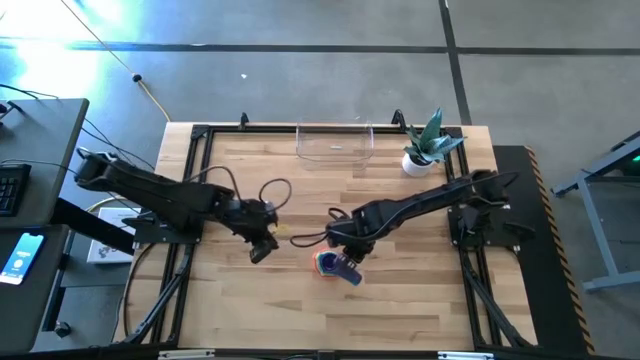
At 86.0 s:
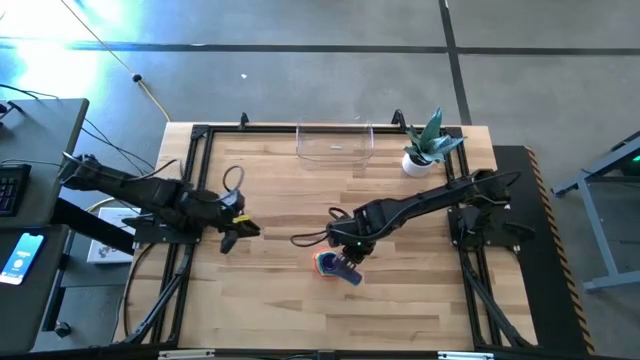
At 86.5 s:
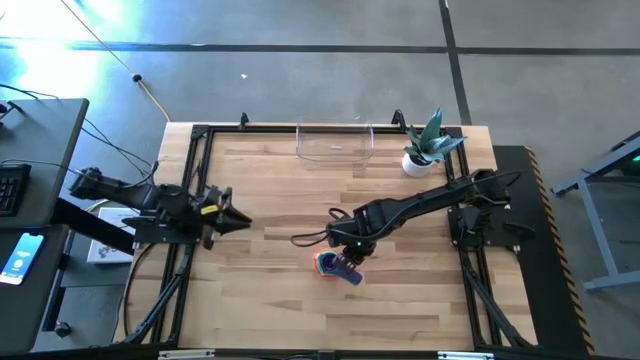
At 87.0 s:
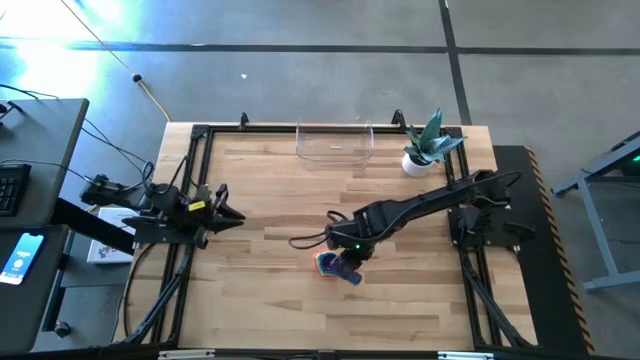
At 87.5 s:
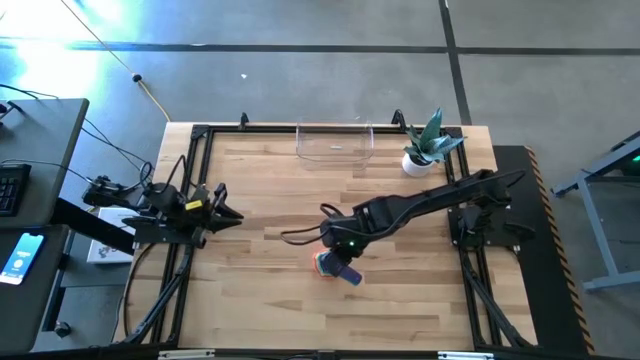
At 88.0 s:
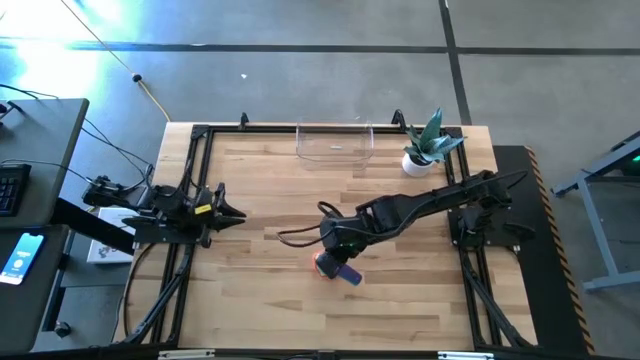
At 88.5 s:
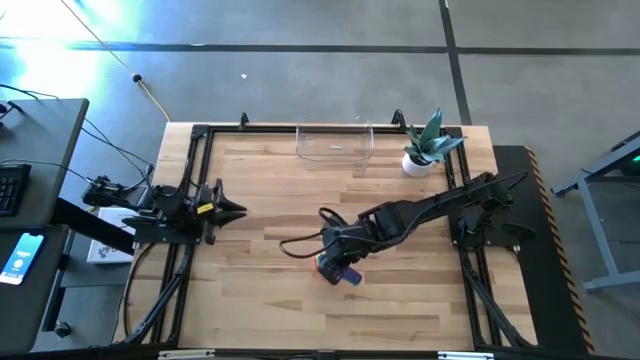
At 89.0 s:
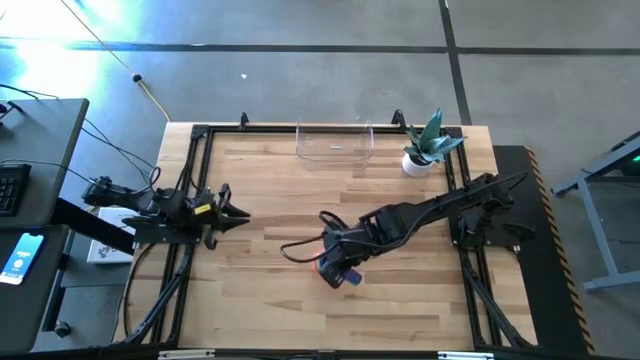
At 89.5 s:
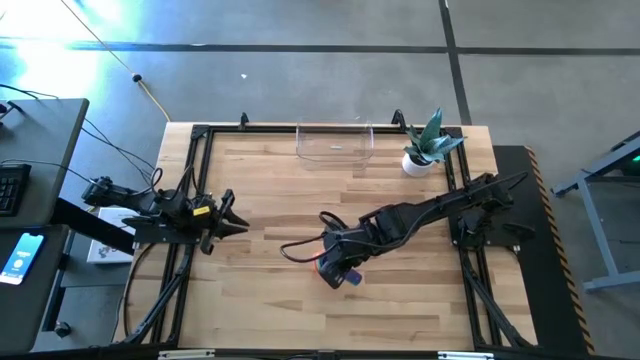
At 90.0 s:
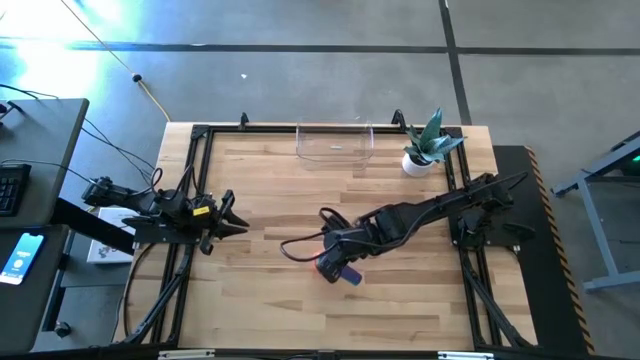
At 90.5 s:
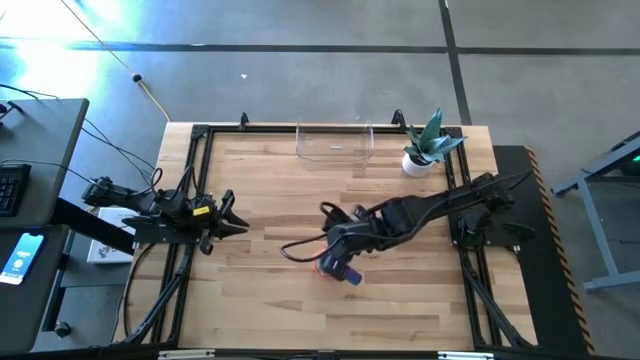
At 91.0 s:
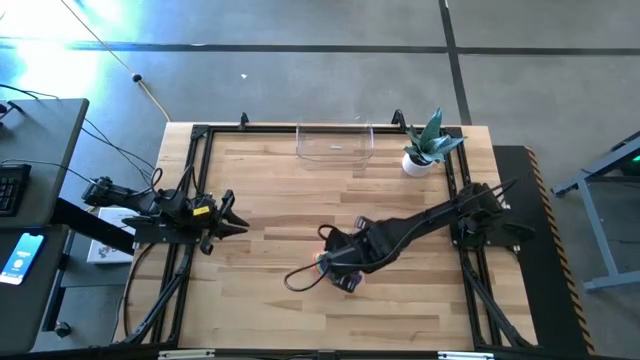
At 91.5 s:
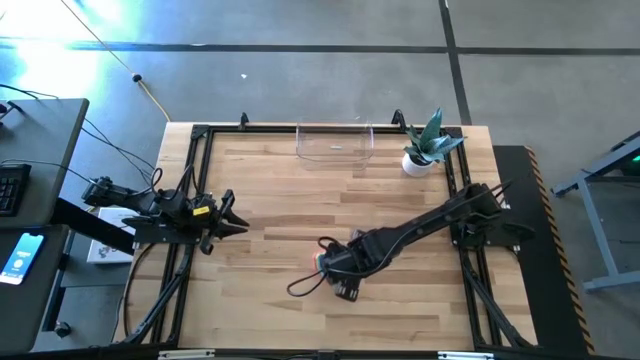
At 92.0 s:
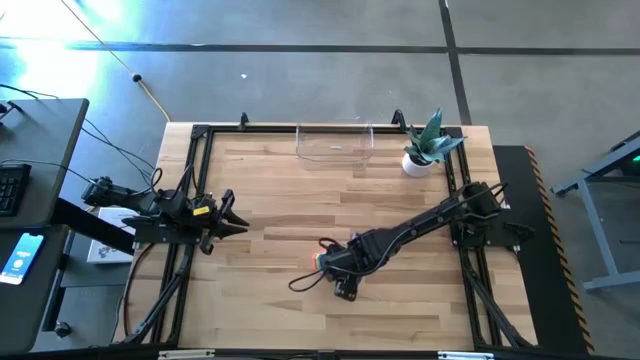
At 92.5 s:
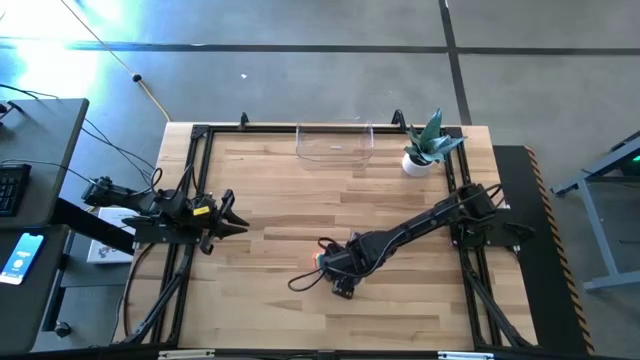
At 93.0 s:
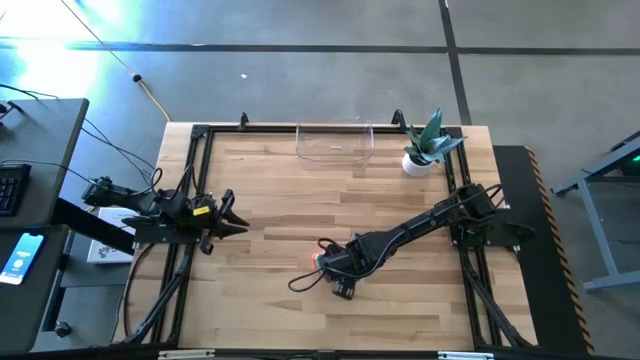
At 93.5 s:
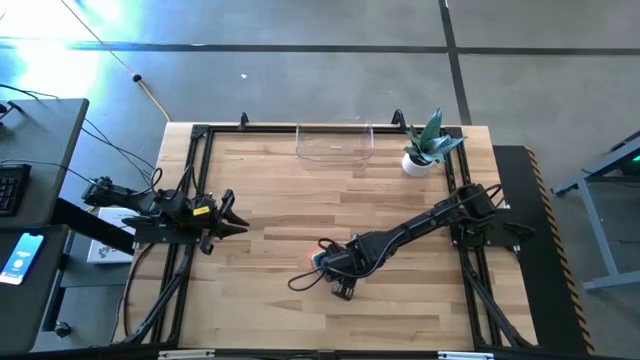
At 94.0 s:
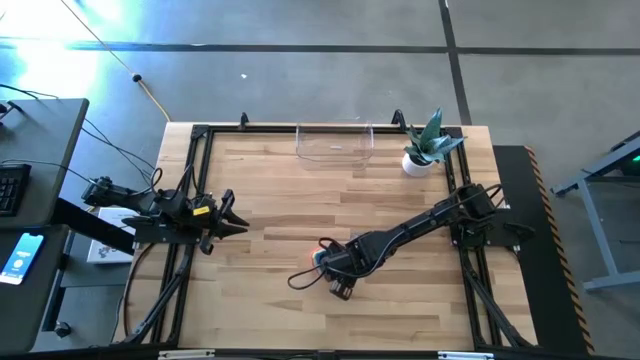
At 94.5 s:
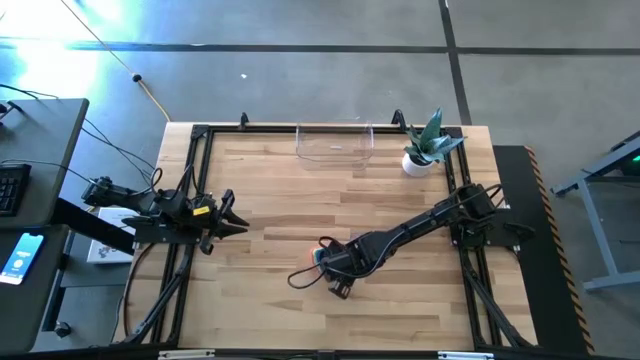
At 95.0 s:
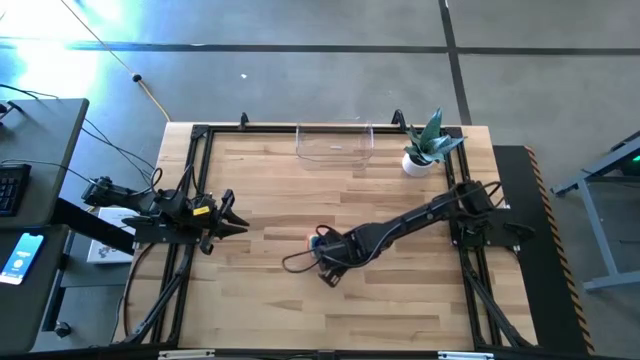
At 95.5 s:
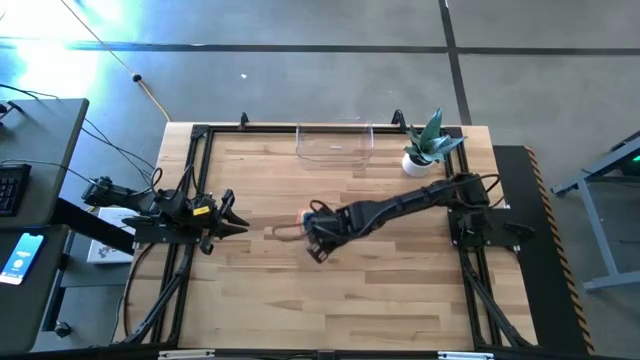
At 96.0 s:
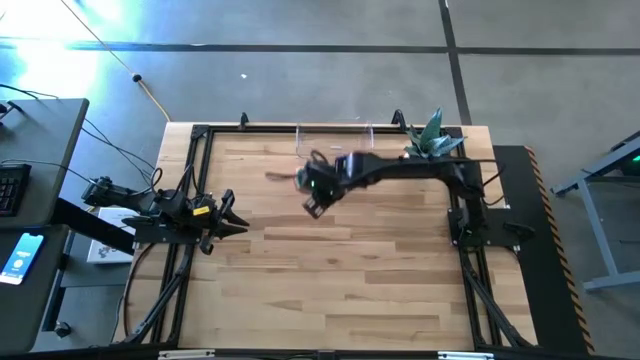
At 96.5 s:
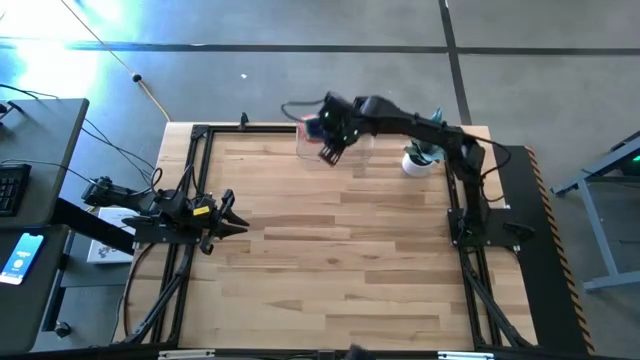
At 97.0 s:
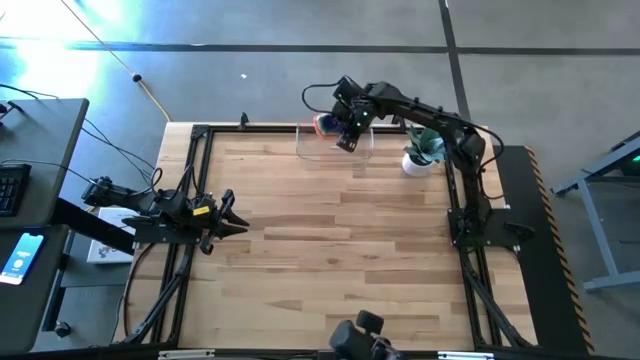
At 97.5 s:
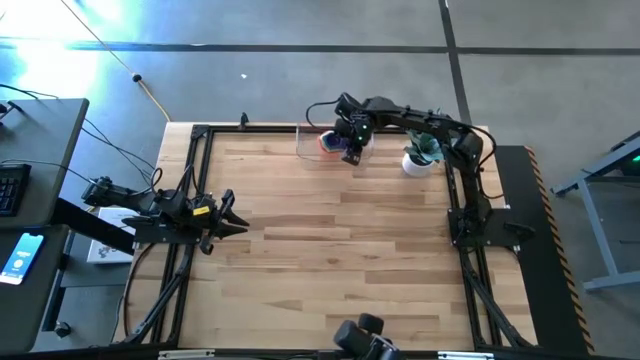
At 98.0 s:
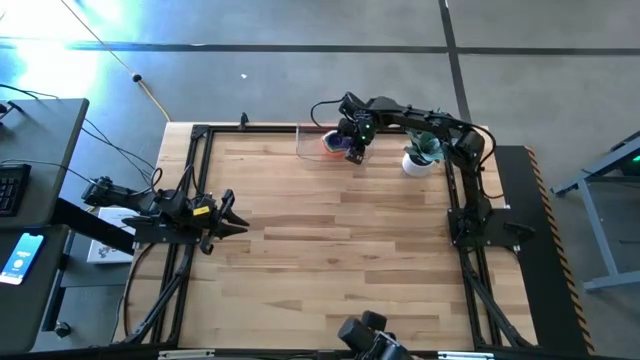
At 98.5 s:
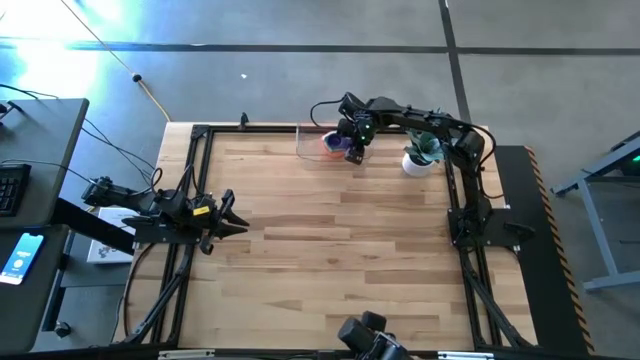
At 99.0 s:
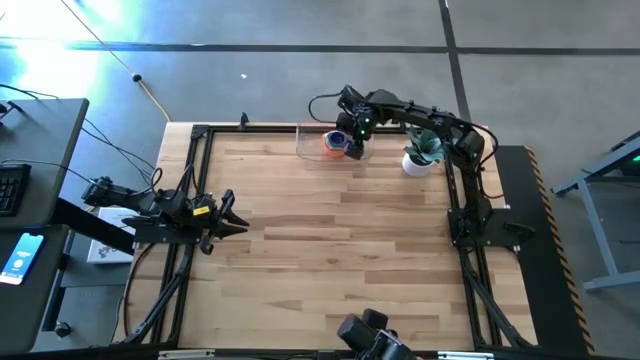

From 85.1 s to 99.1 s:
Task: Nest measuring cups in basket
Put the stacked measuring cups into the transparent bin

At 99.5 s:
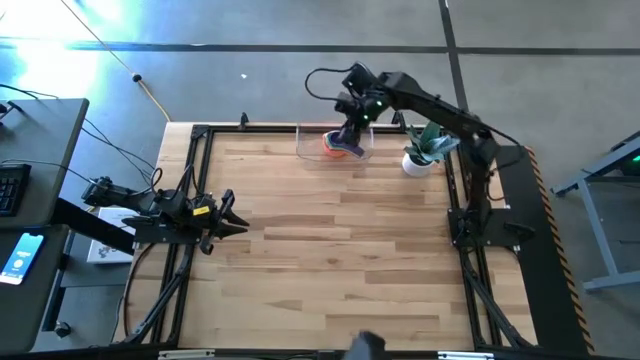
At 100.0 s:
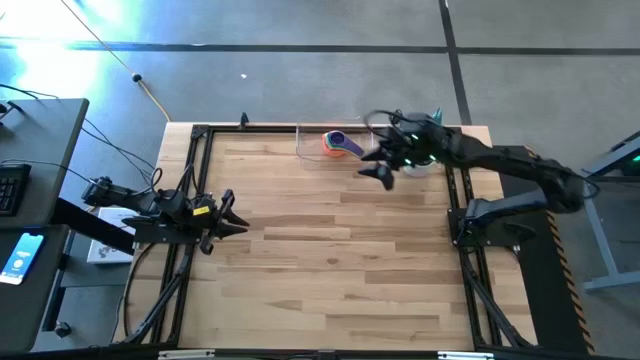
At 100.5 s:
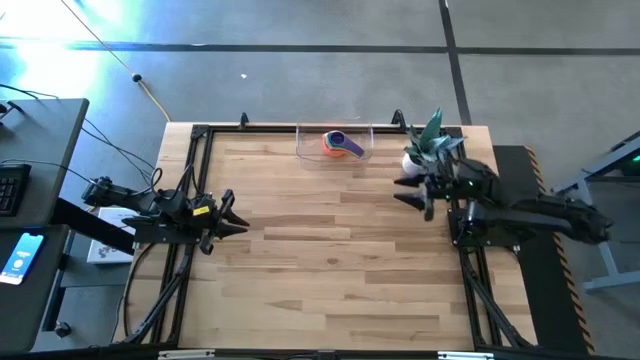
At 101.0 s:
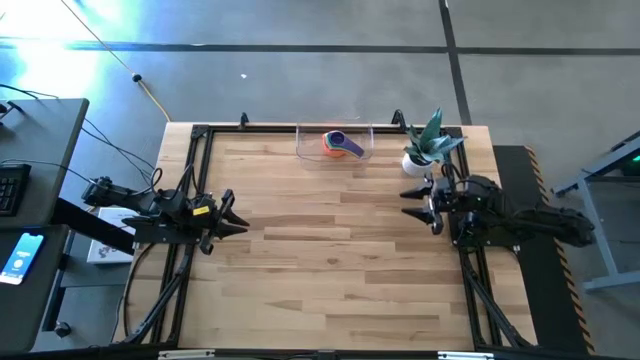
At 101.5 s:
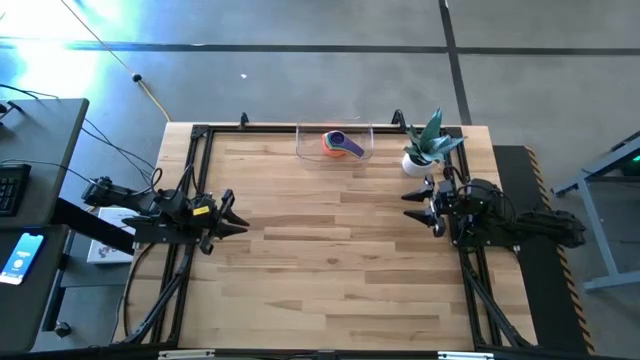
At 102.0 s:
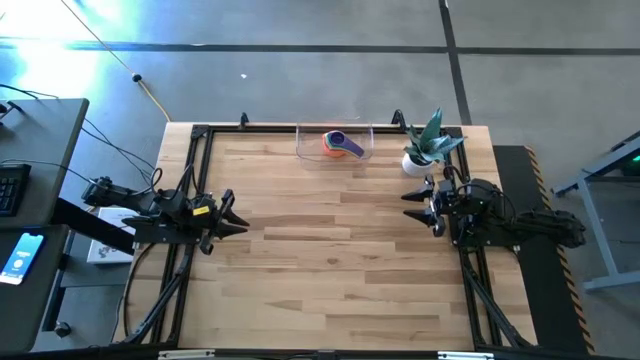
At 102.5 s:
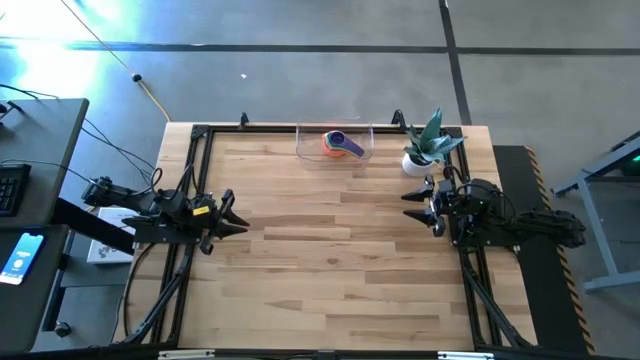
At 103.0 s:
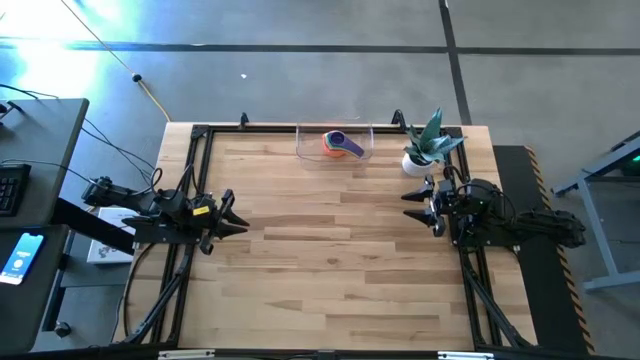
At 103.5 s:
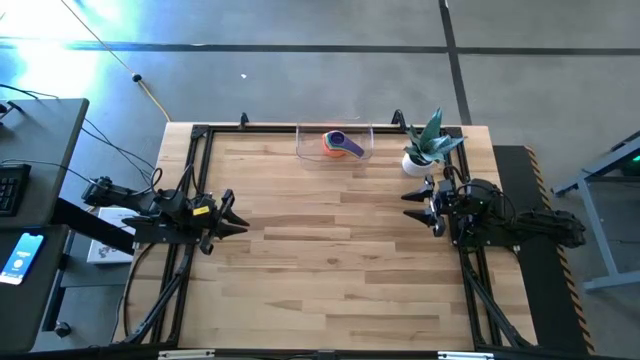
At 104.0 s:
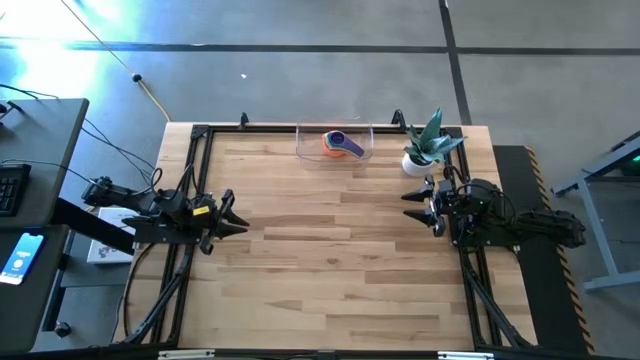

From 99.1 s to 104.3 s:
Return to Home Position

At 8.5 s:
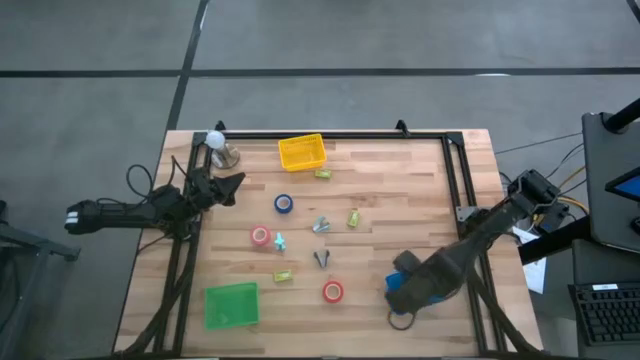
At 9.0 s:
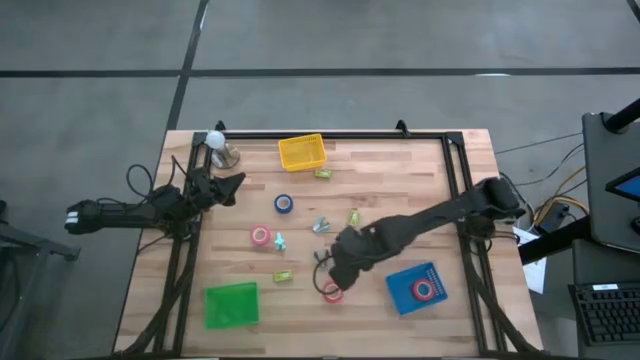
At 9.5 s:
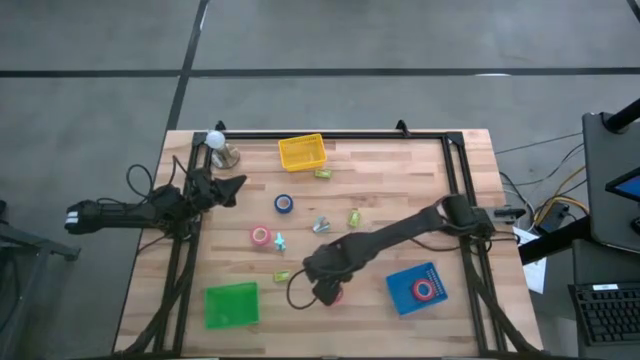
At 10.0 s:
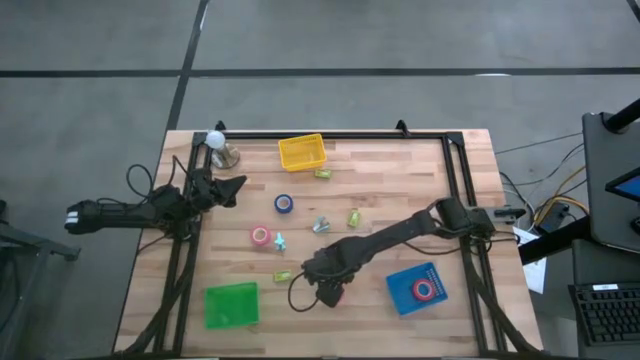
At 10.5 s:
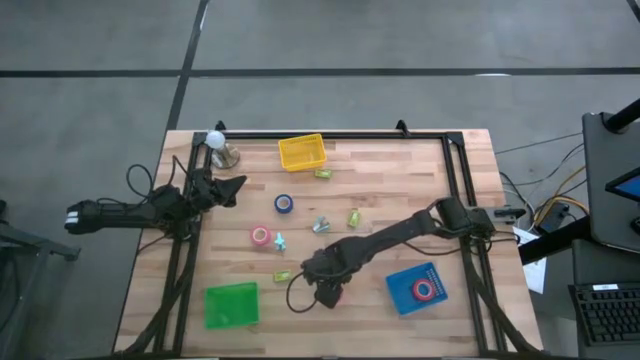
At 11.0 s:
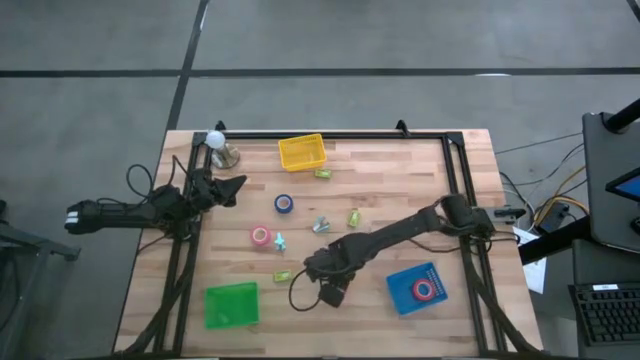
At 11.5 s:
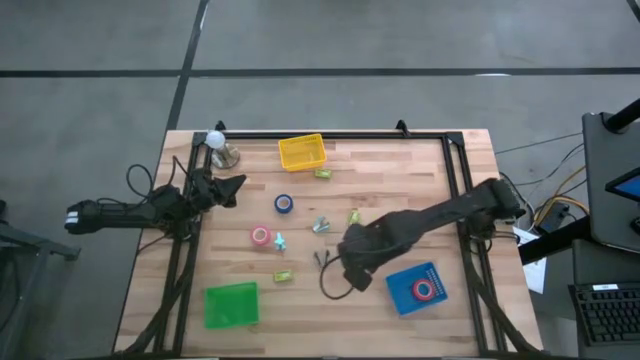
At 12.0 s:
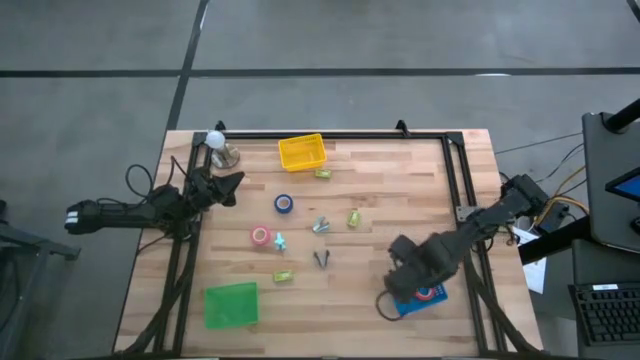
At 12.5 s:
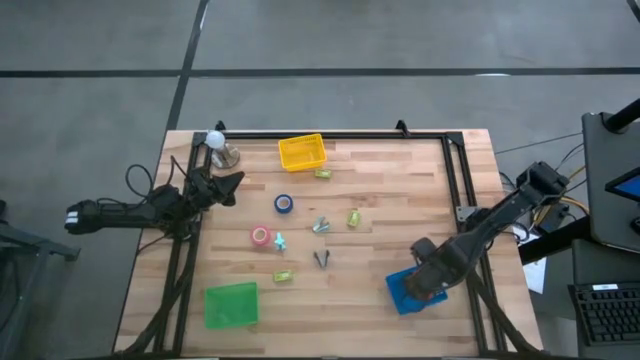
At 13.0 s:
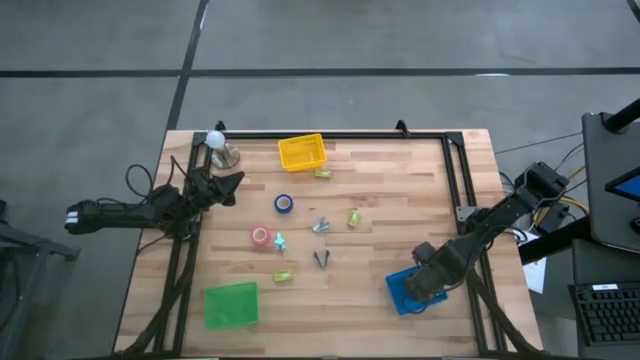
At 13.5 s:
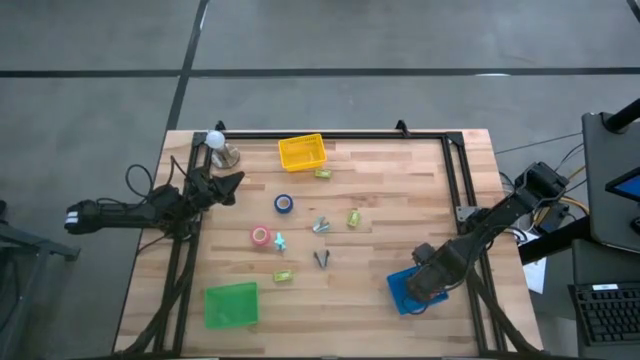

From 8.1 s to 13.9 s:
Task: Pick and place Stapler, Stapler remover, tape
Put the orange tape into the blue basket
